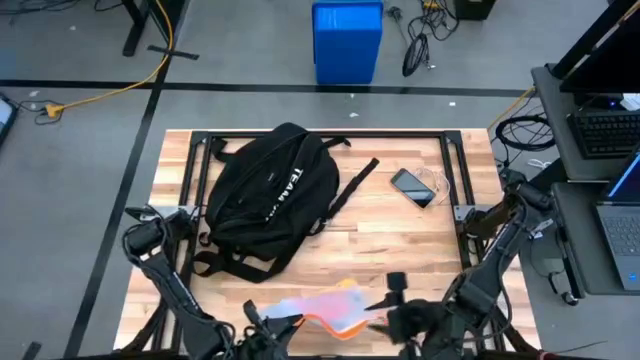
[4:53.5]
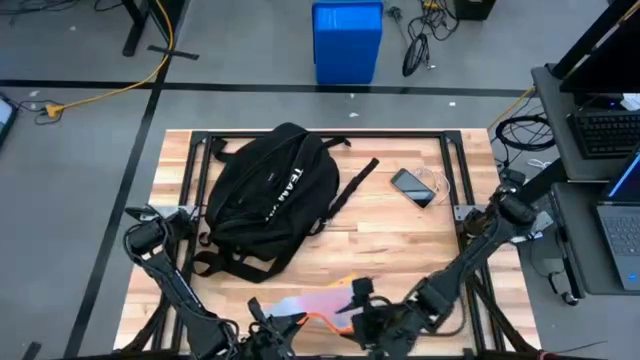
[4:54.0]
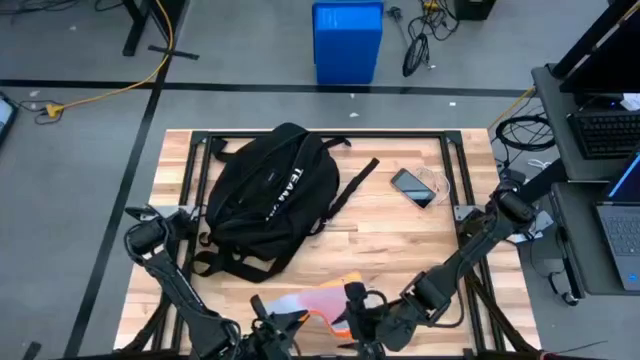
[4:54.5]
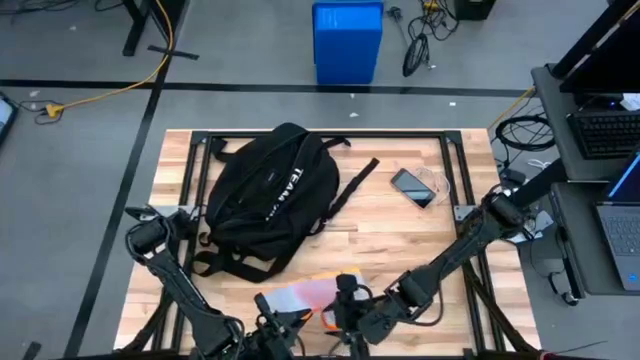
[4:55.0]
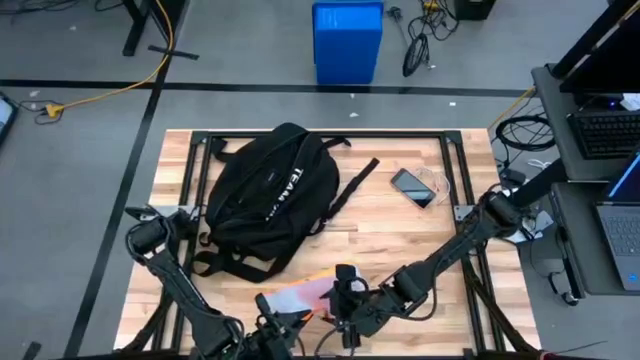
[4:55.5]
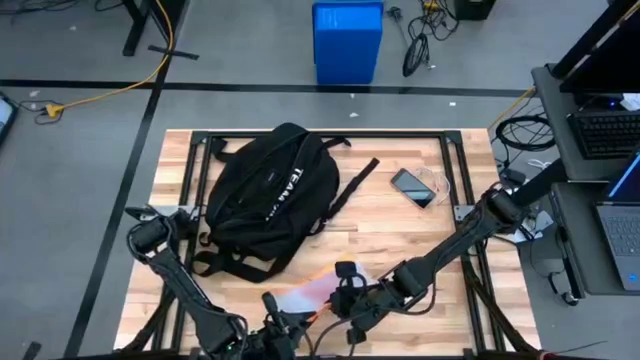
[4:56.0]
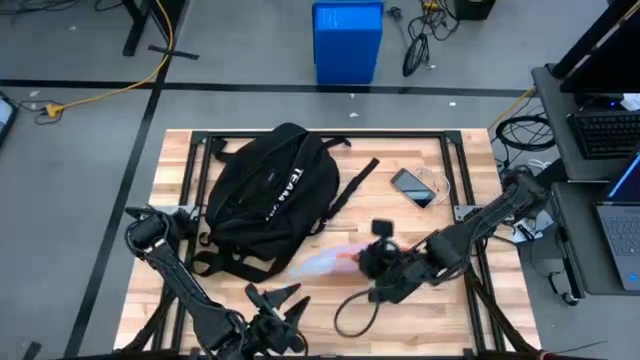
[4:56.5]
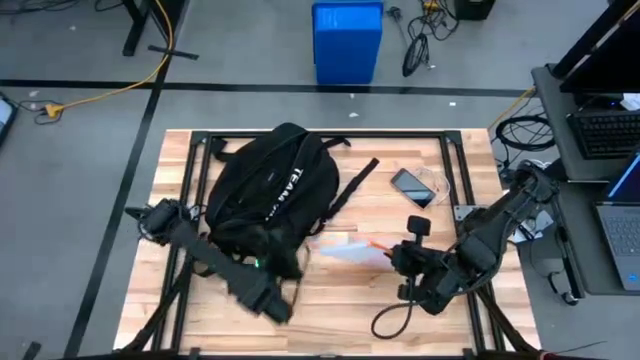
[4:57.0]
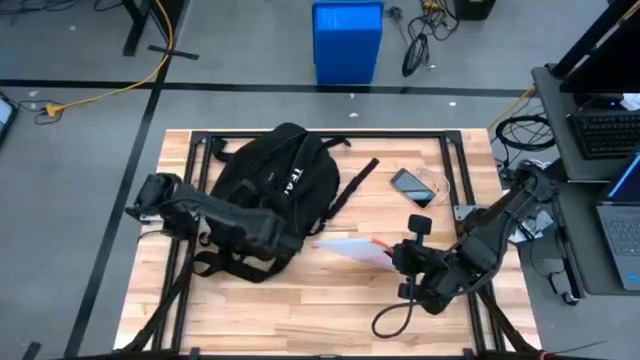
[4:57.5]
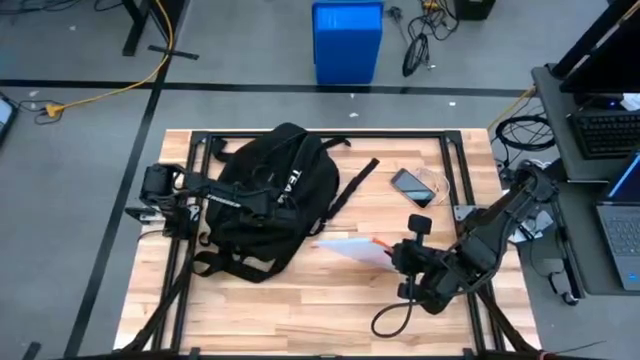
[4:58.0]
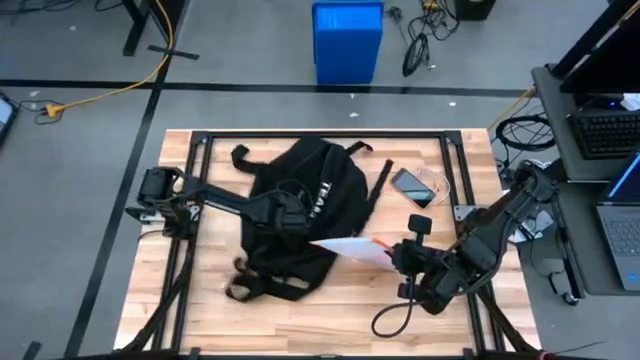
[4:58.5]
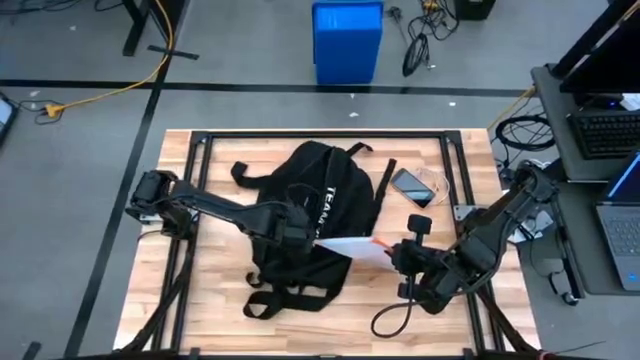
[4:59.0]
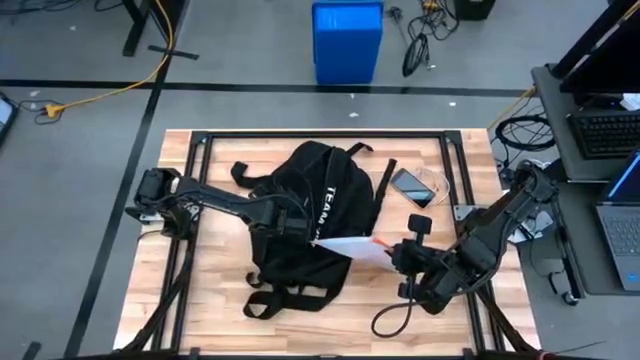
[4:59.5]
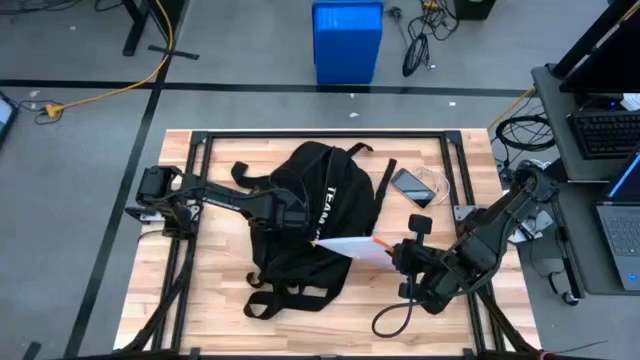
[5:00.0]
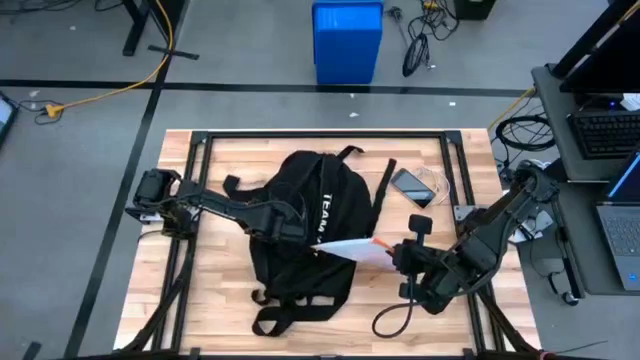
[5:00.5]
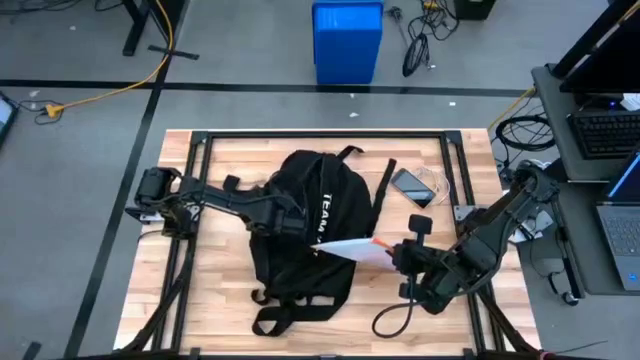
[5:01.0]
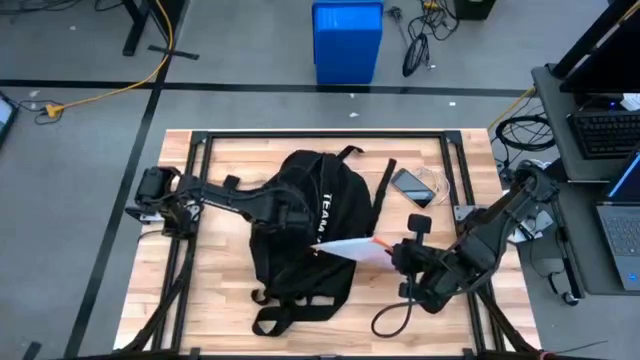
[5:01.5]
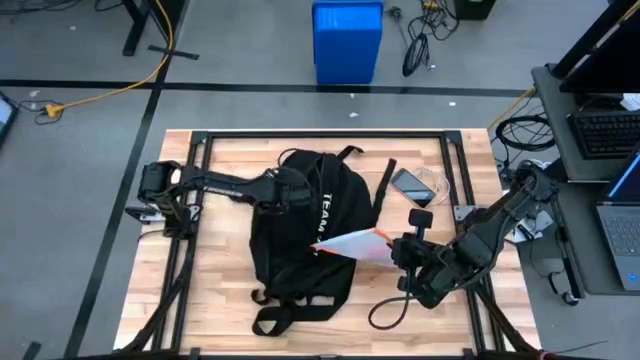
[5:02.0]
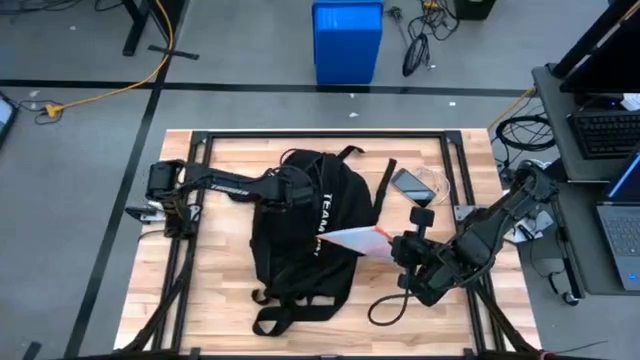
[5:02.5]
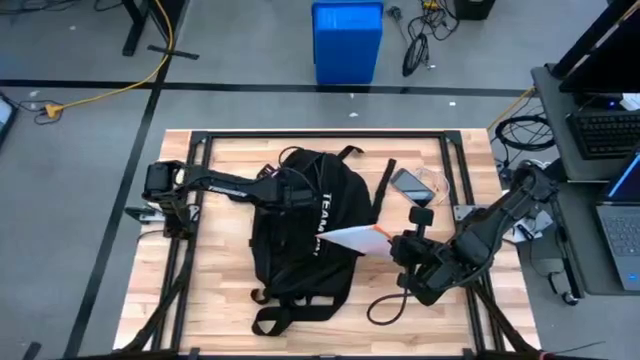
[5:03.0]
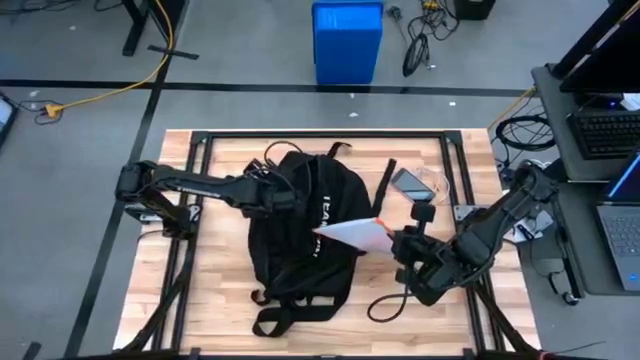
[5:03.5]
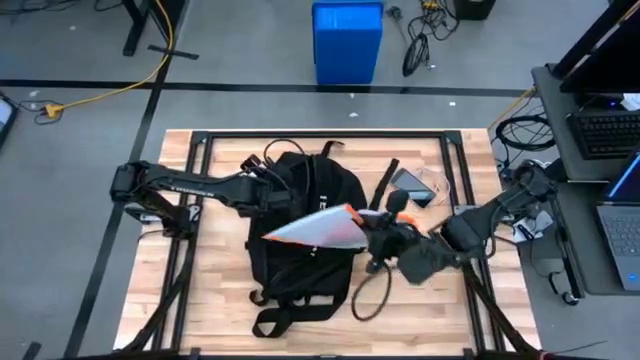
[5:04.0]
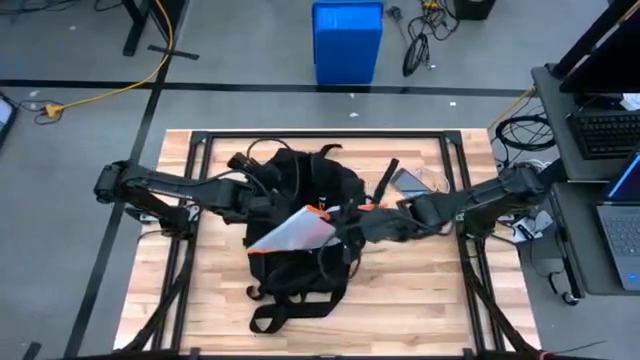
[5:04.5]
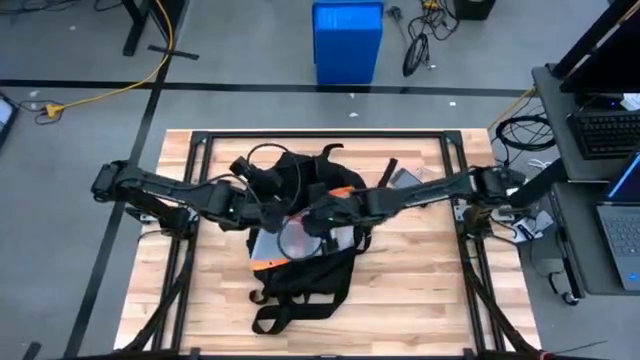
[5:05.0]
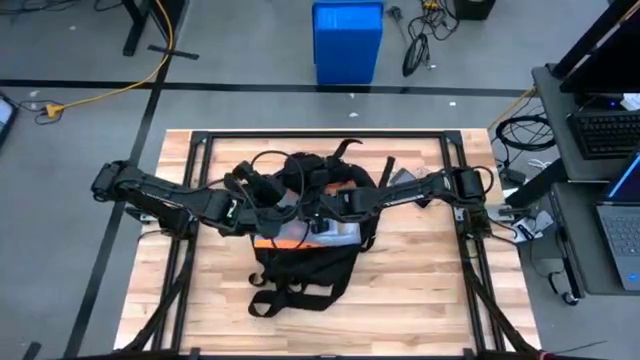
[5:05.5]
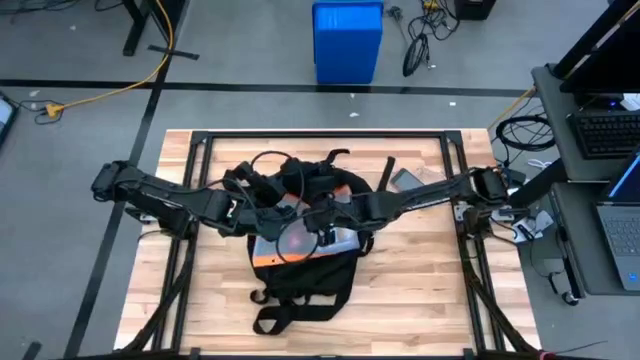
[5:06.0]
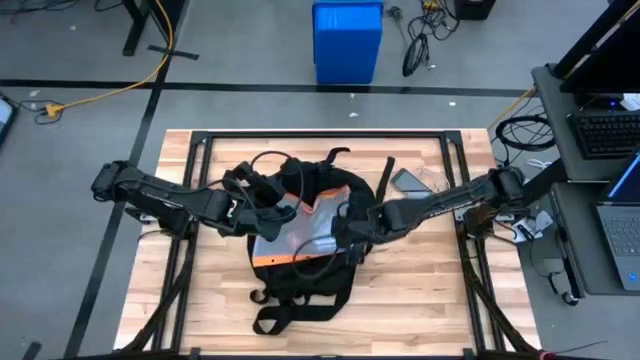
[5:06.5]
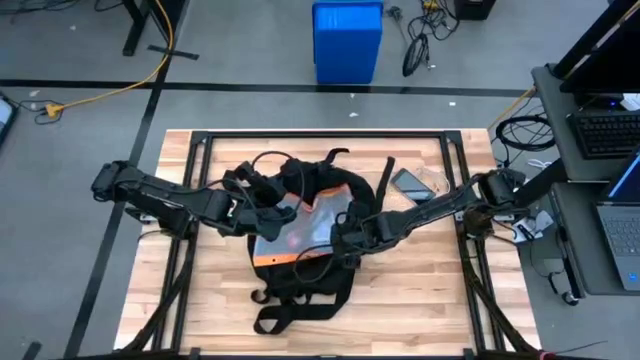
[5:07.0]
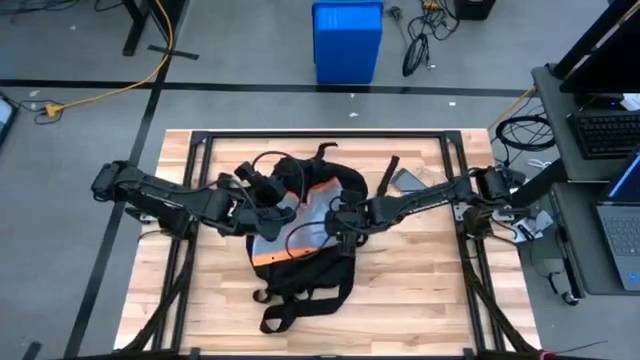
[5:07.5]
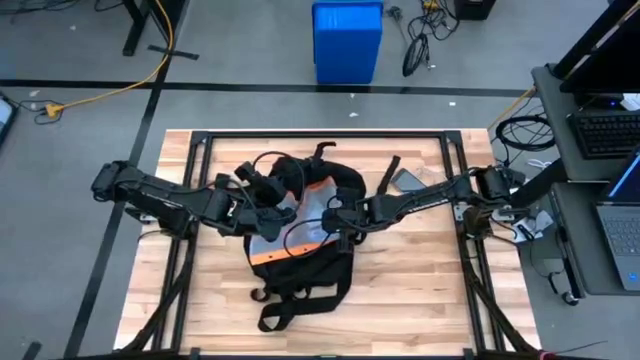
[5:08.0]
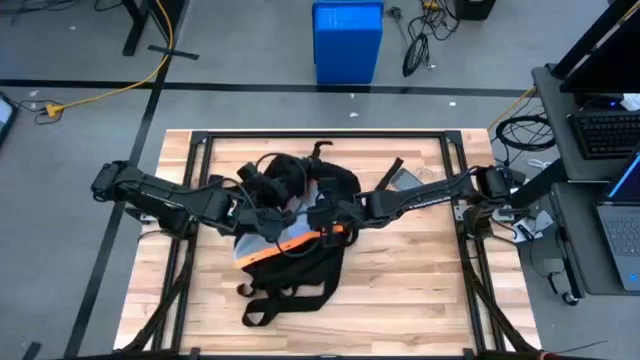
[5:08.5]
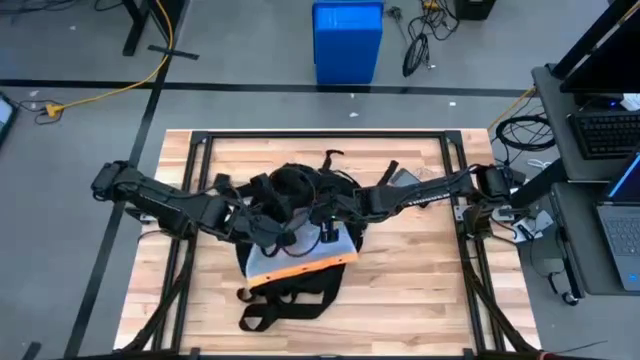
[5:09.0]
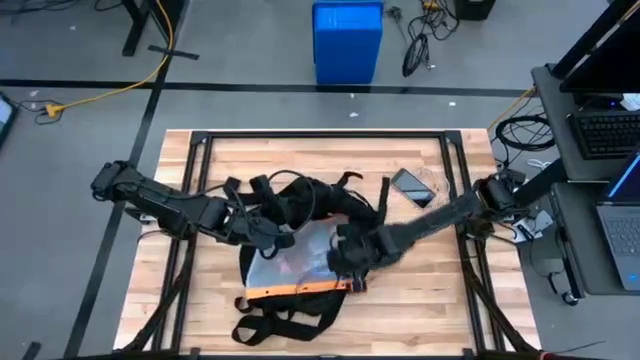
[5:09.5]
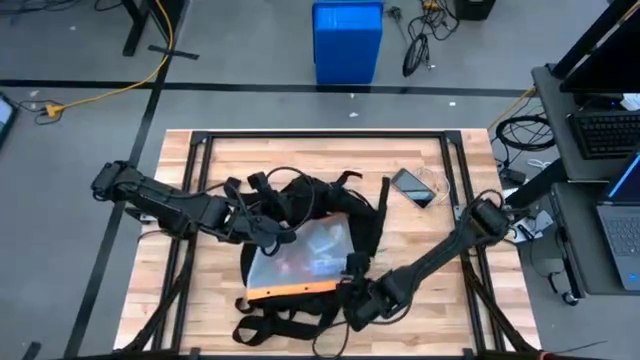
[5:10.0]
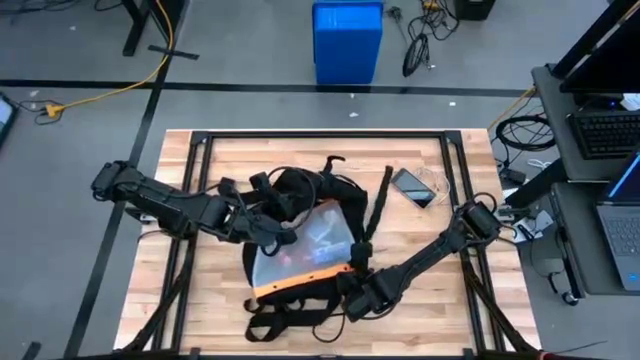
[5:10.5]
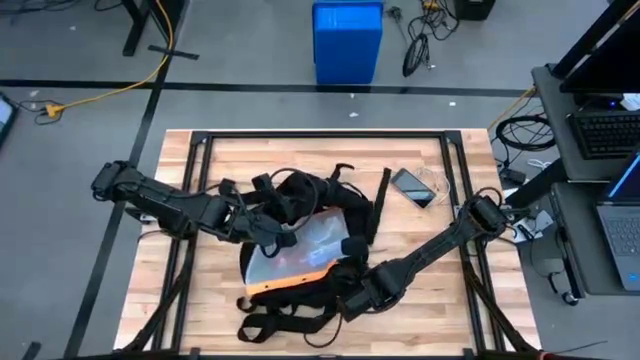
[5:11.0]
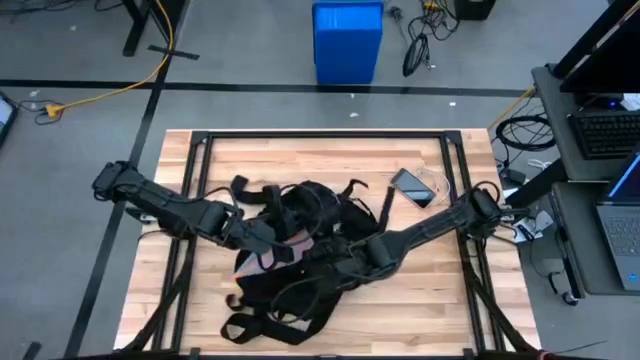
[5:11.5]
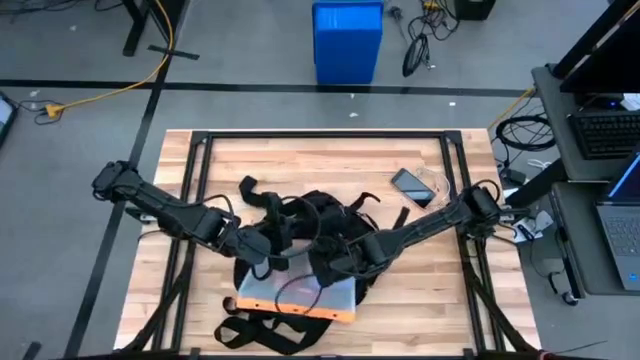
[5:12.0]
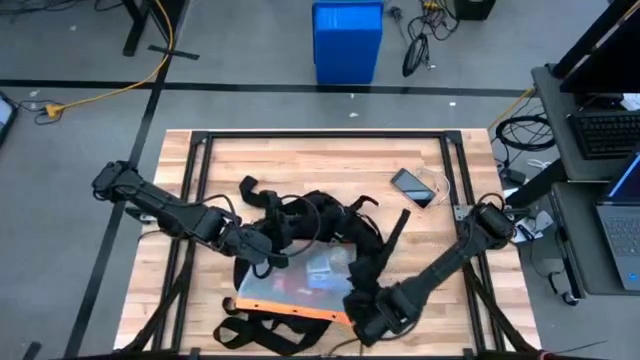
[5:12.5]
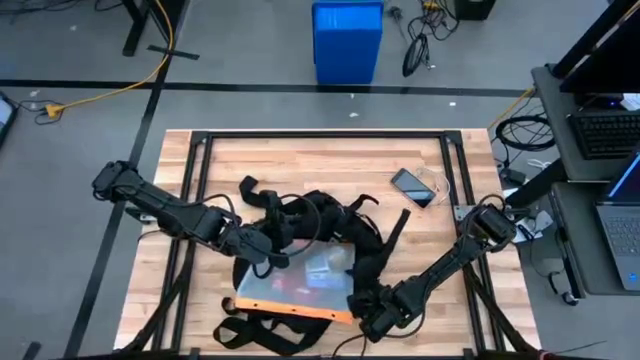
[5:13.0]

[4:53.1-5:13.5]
Task: Unpack backpack
Put the zip bag into the black backpack
